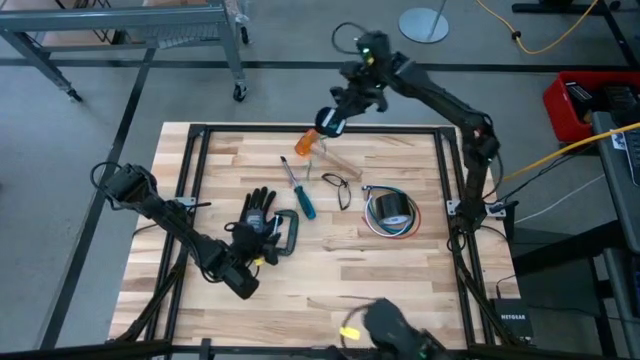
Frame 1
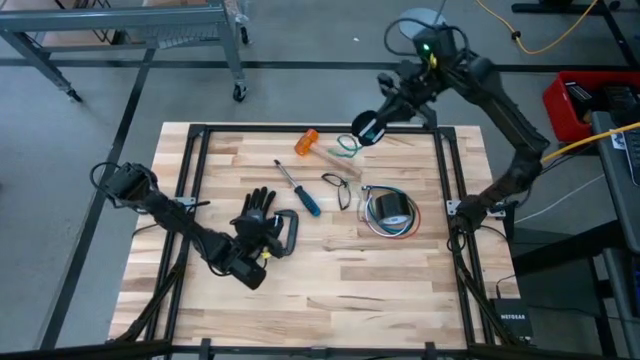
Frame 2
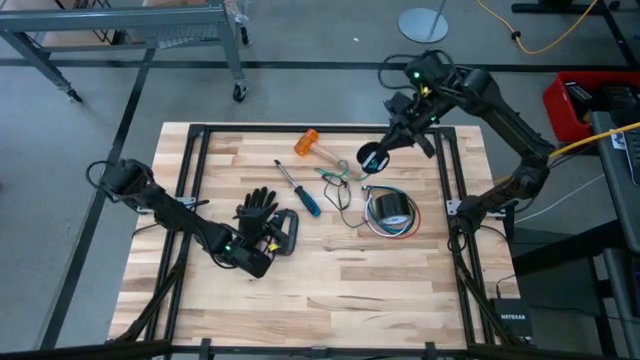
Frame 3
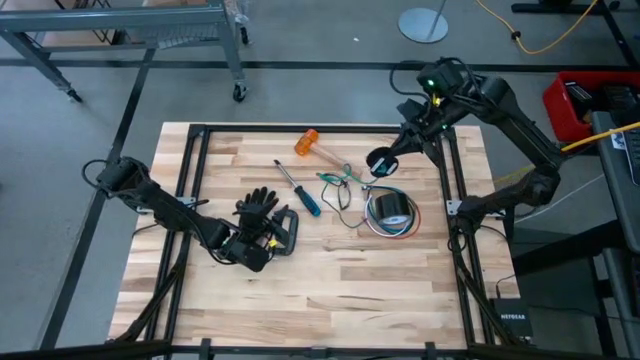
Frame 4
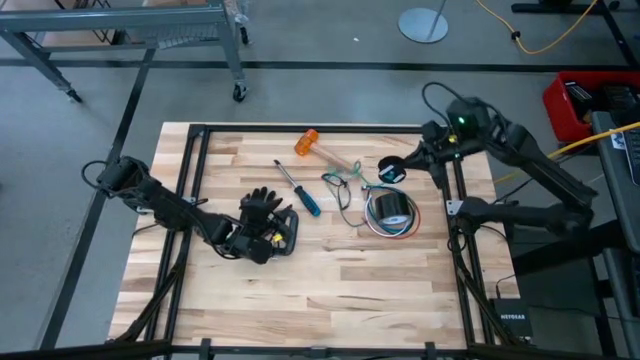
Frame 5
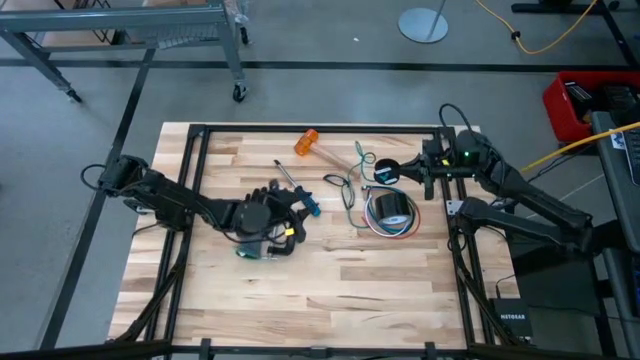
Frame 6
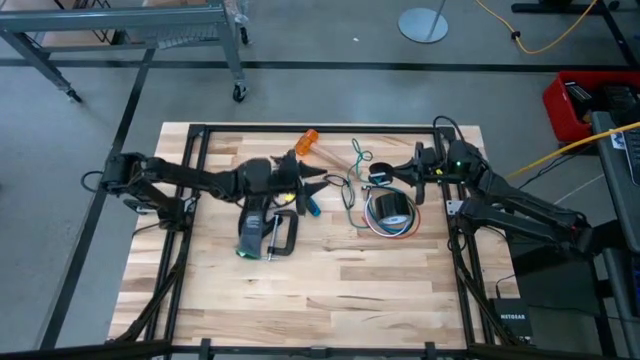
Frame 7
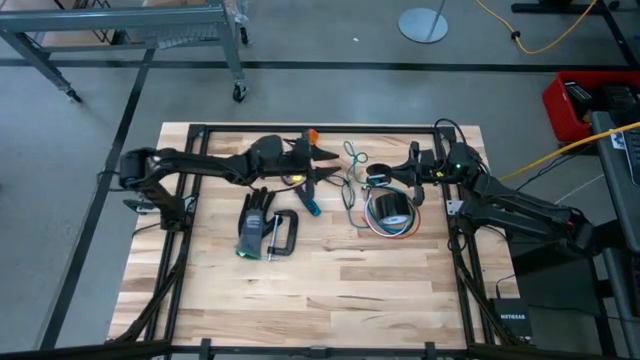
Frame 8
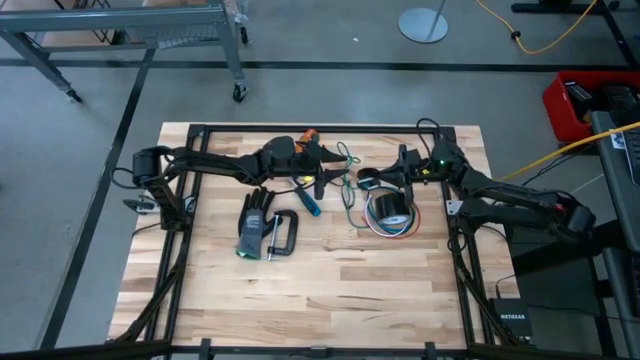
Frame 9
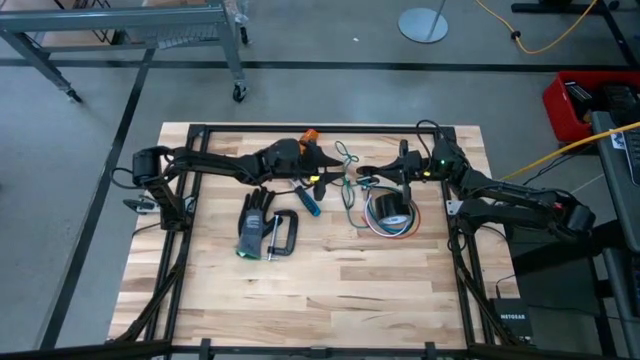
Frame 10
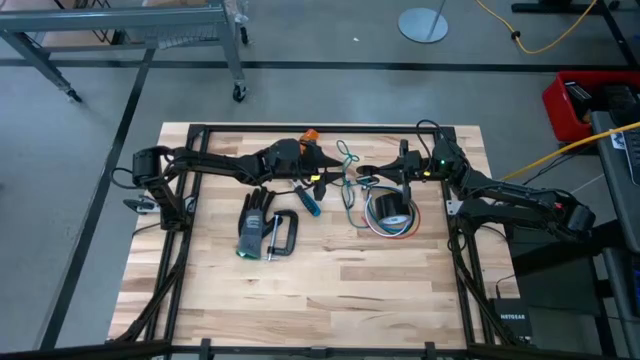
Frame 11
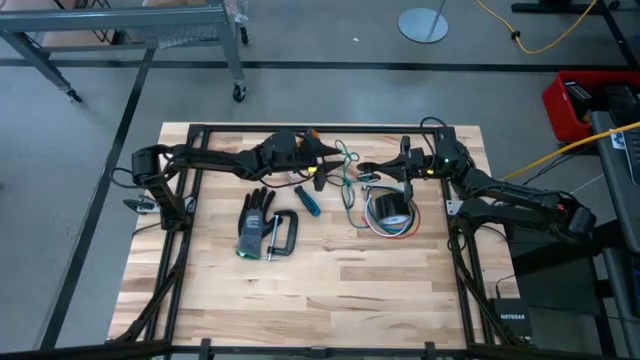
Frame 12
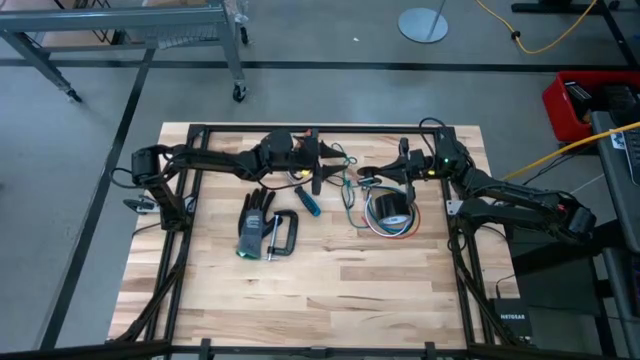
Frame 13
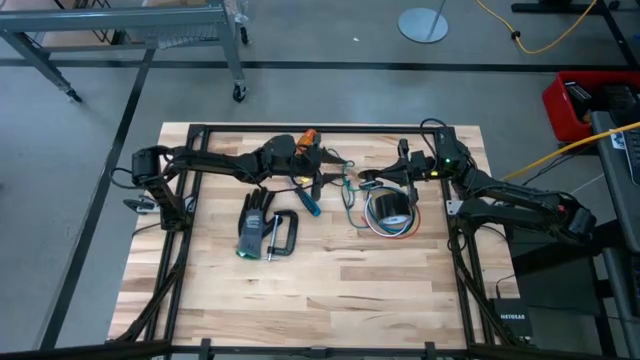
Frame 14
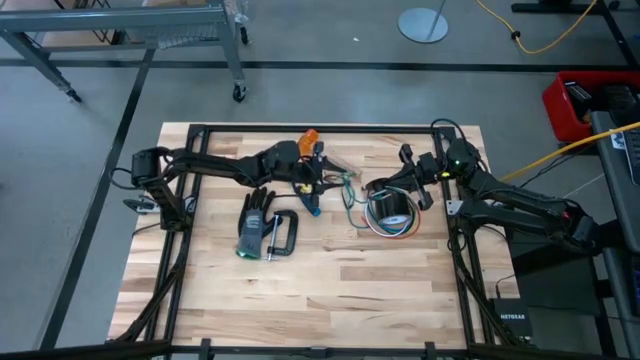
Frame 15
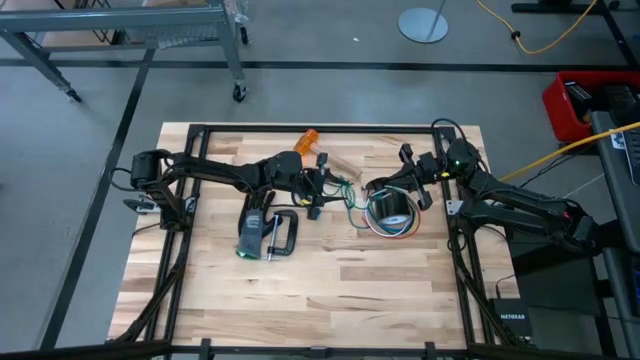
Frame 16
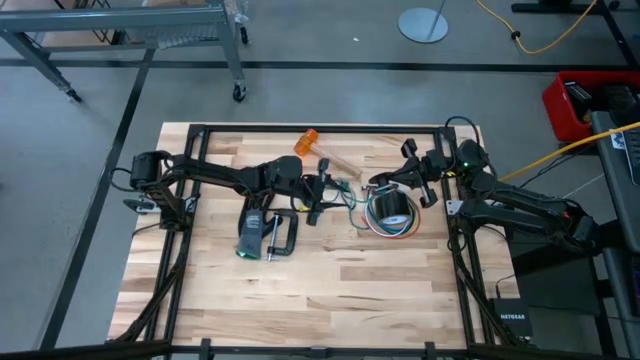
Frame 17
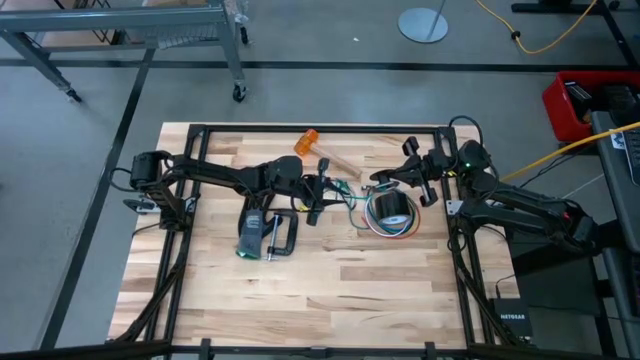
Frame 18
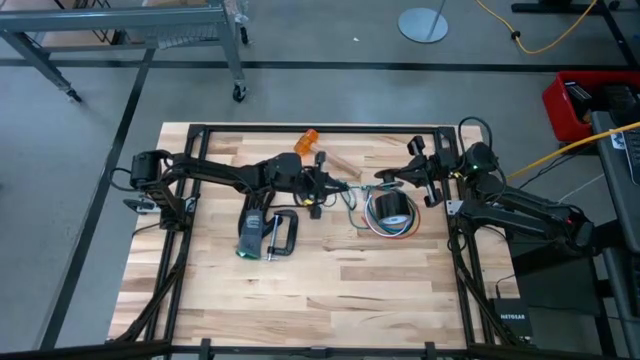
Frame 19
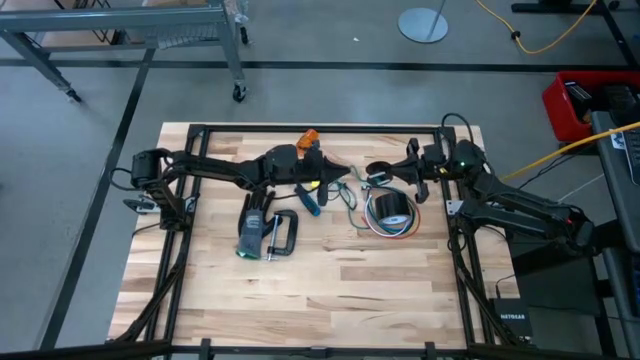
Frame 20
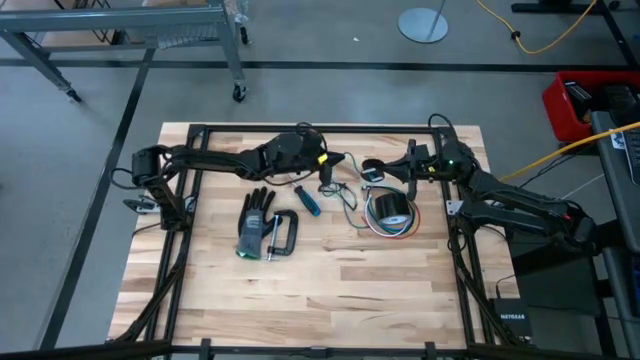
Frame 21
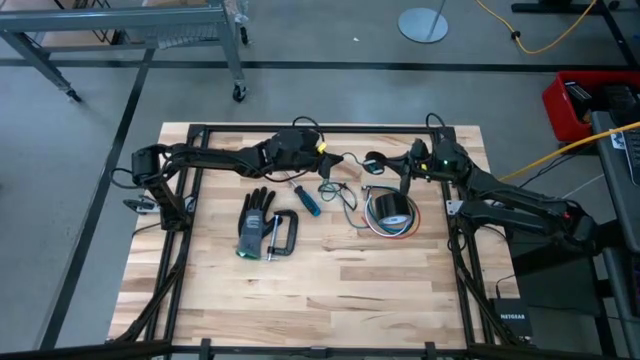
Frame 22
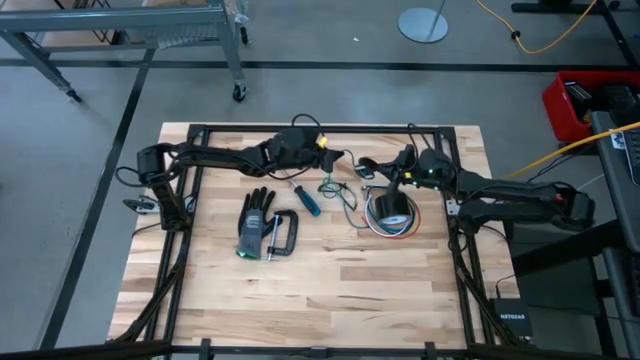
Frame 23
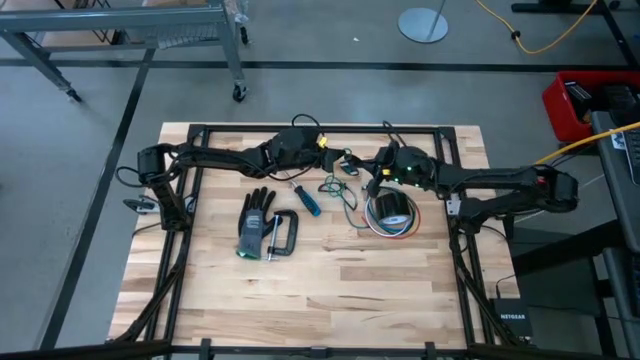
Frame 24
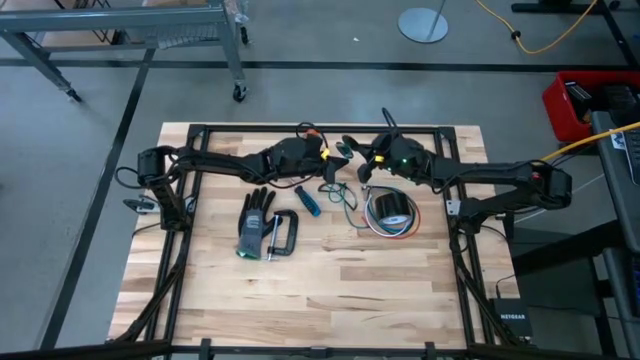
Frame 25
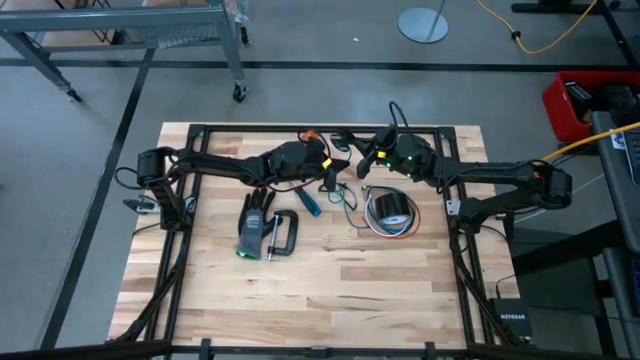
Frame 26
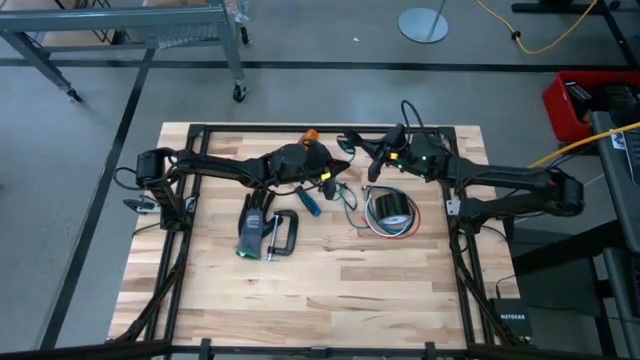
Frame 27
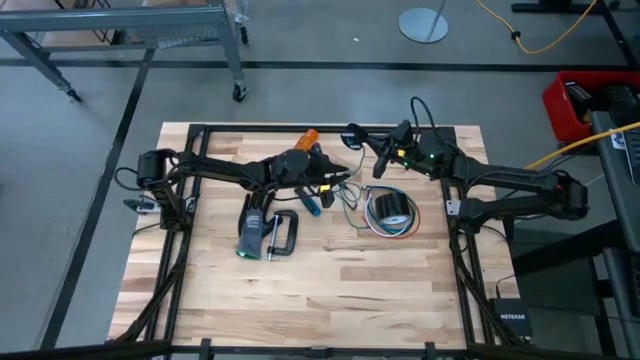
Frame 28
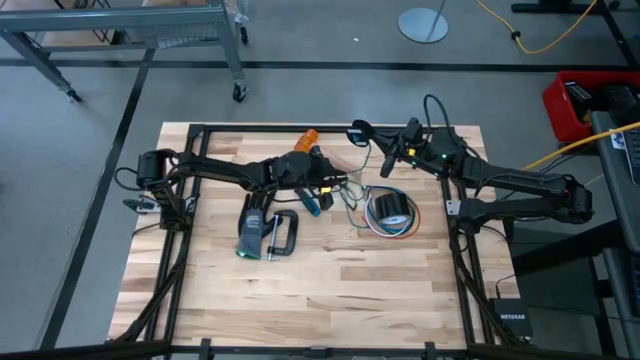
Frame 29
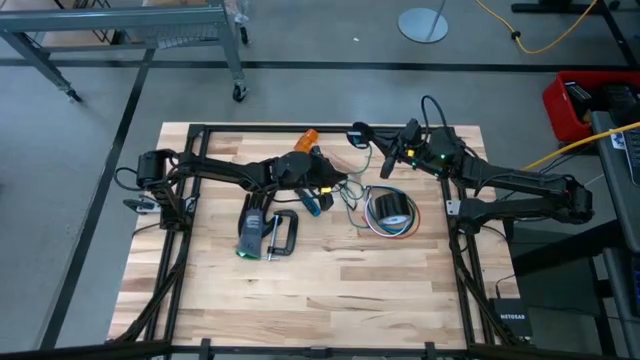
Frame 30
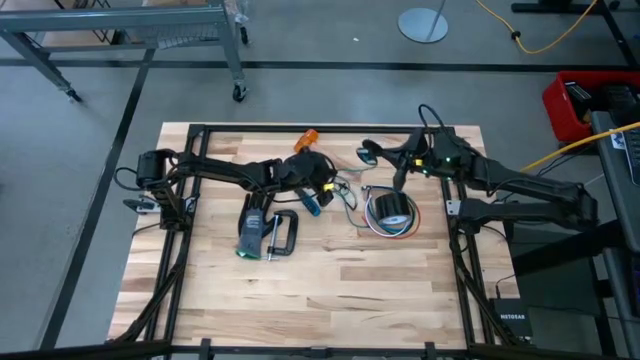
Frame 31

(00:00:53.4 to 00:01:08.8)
Task: Coil cords
Coil the green wire onto the spool

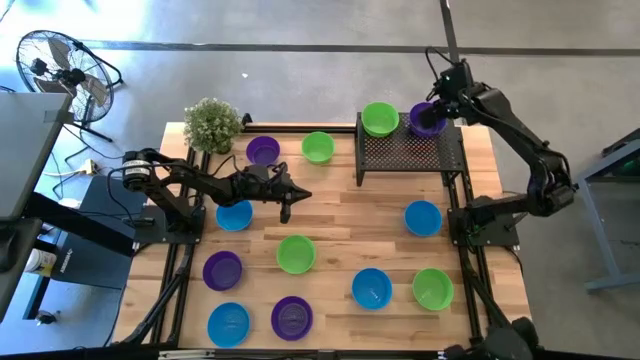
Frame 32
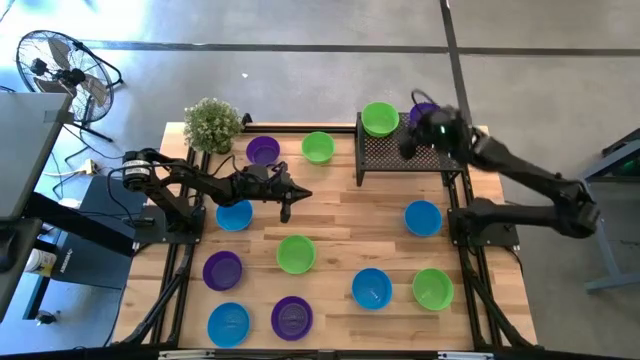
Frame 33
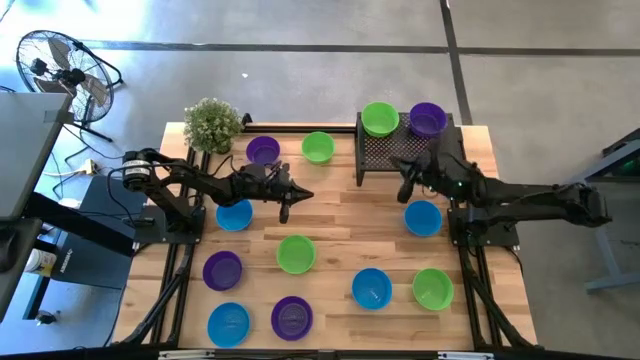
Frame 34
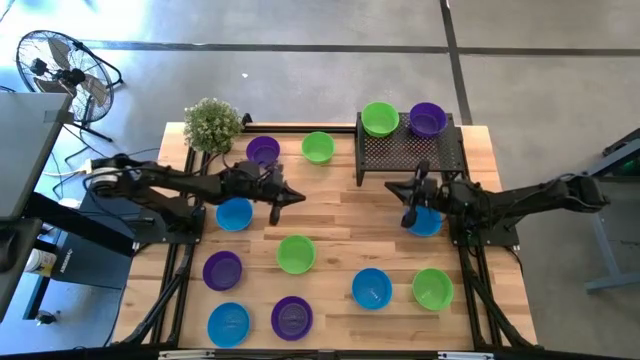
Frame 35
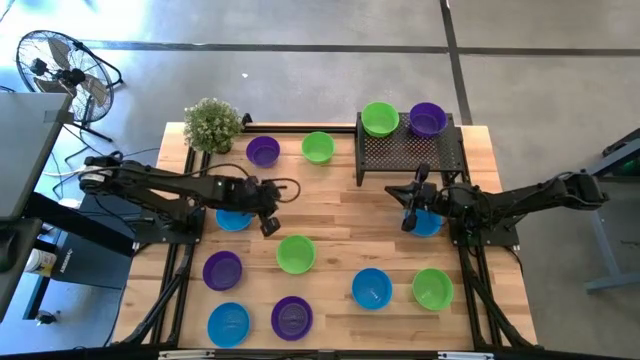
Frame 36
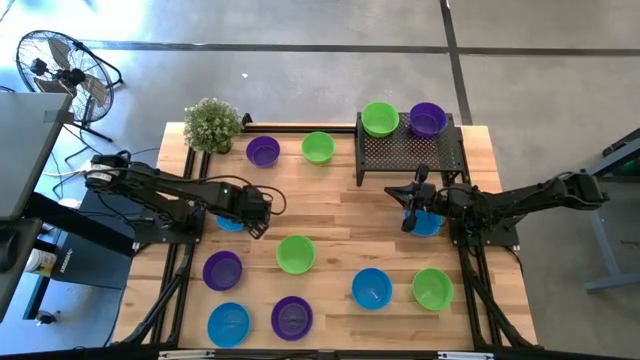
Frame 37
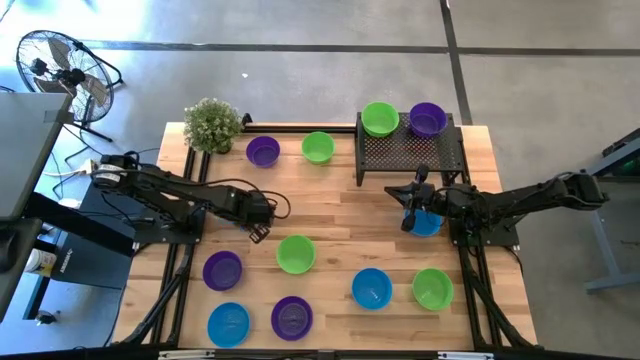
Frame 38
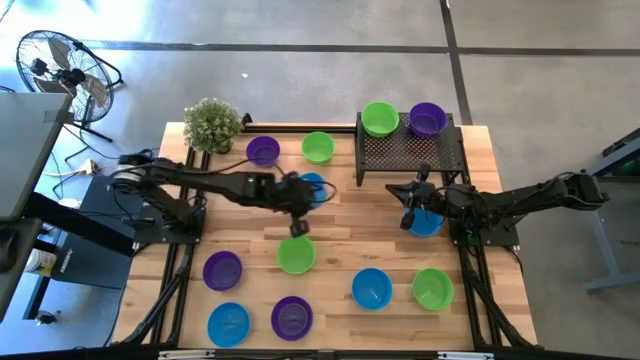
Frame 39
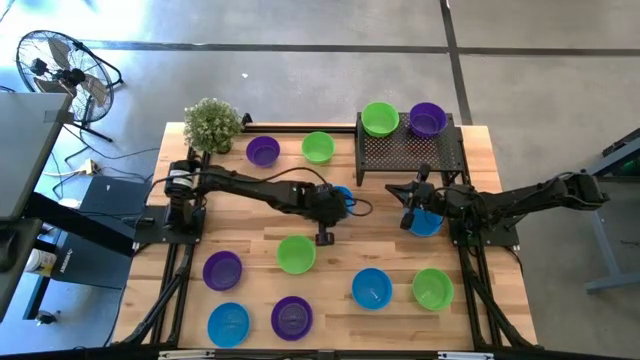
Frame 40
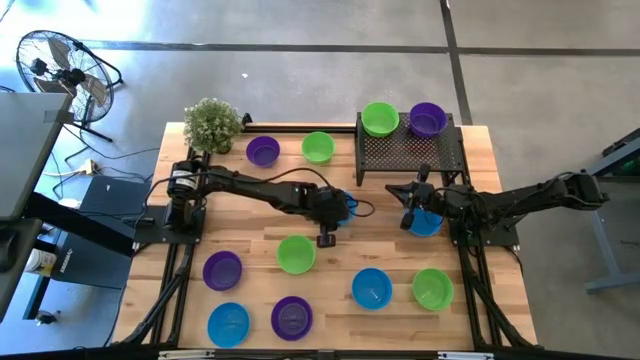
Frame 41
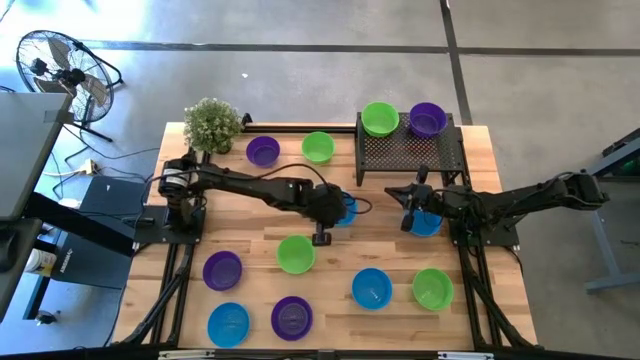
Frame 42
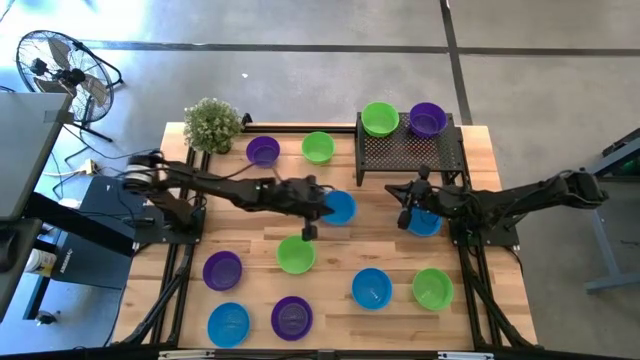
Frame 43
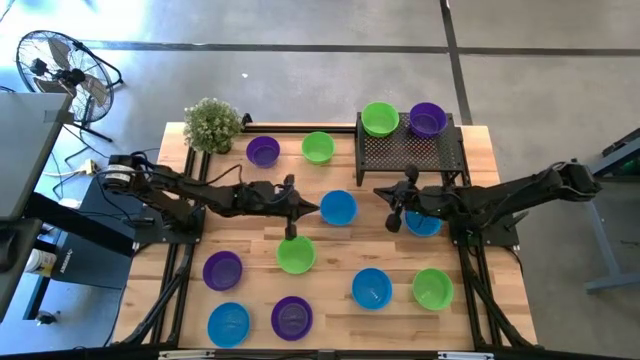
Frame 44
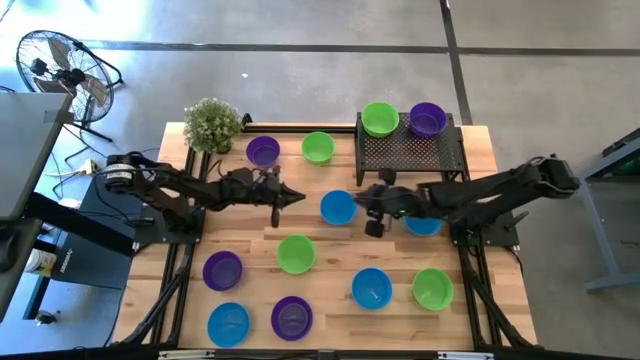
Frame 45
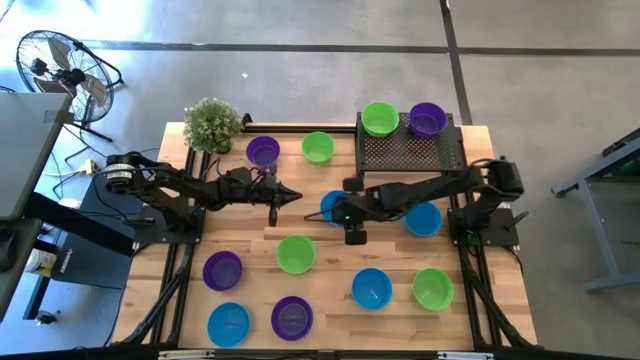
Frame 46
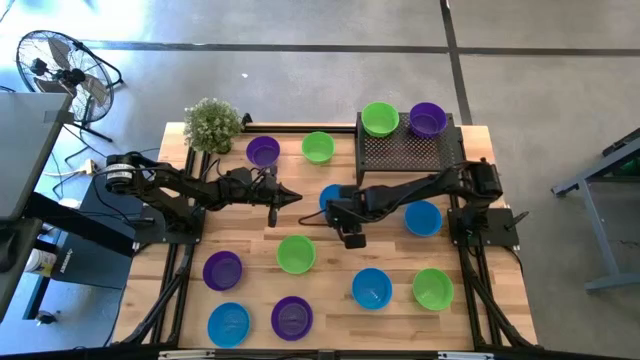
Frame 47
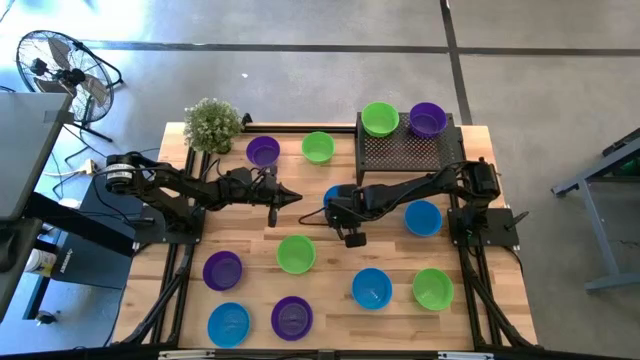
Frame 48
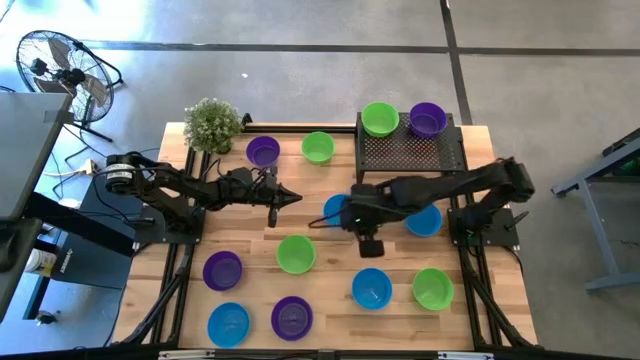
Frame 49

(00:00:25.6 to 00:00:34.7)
Task: Pick & Place Mini bowls
Put the blue bowl on the shelf
